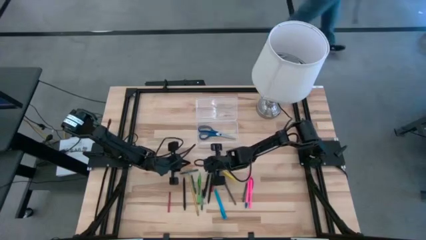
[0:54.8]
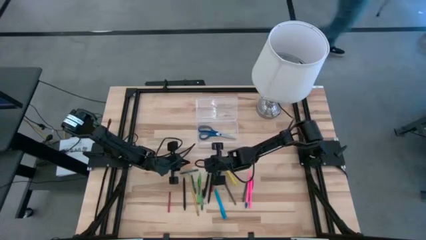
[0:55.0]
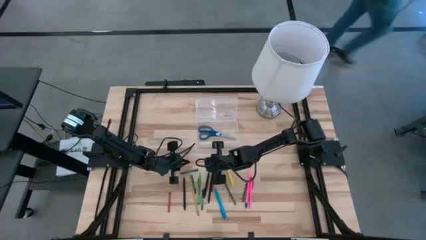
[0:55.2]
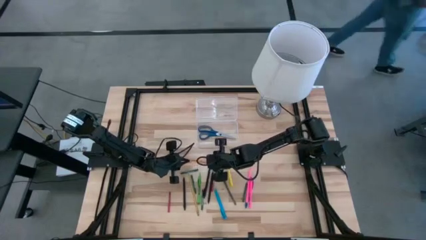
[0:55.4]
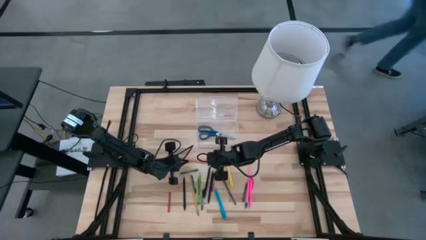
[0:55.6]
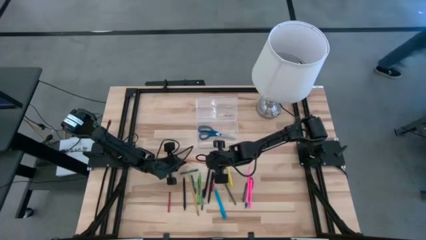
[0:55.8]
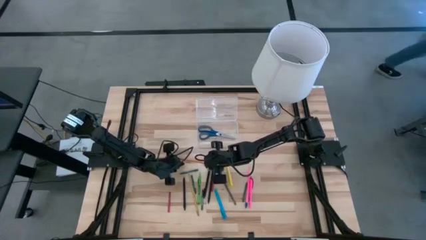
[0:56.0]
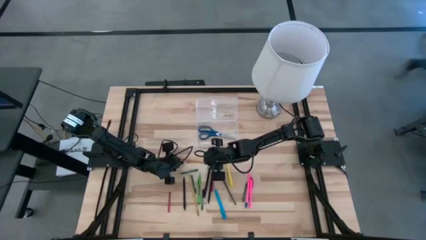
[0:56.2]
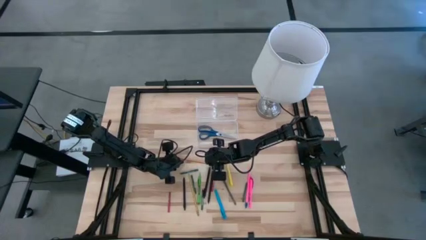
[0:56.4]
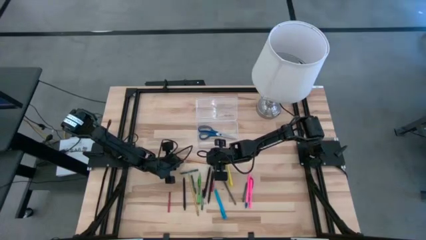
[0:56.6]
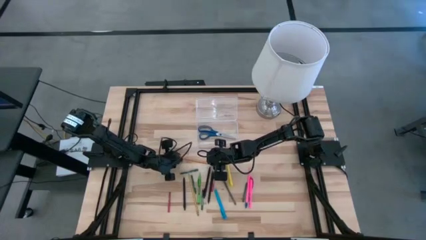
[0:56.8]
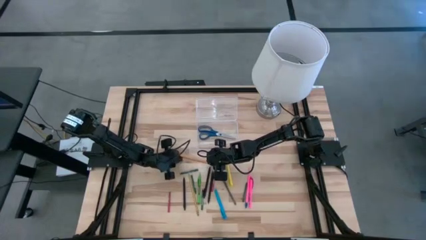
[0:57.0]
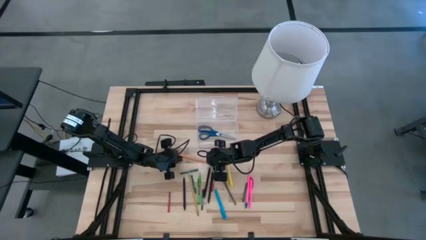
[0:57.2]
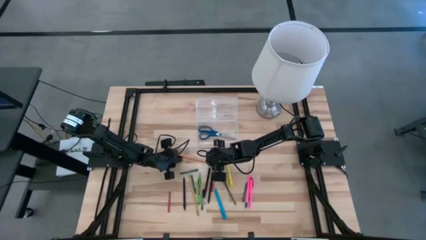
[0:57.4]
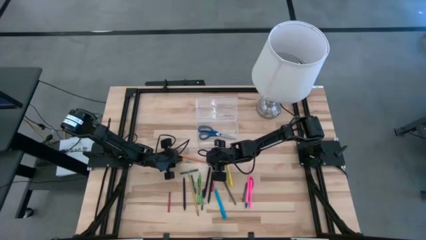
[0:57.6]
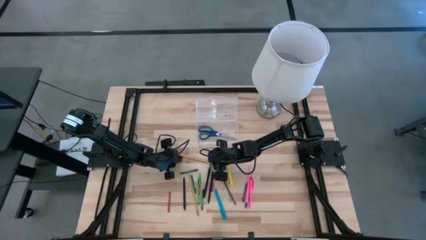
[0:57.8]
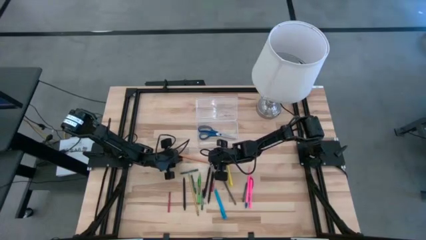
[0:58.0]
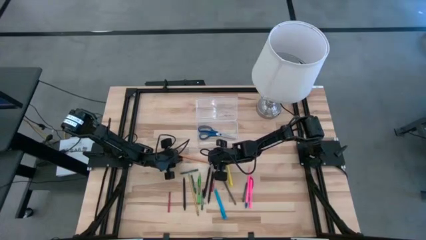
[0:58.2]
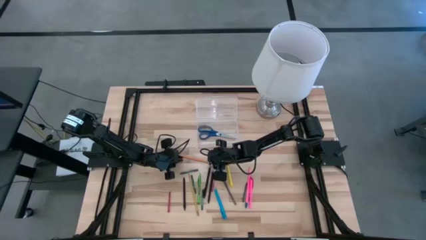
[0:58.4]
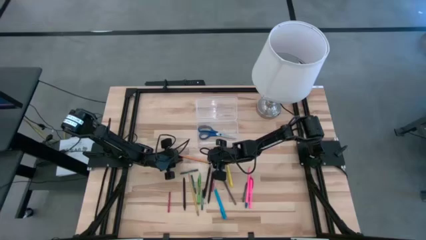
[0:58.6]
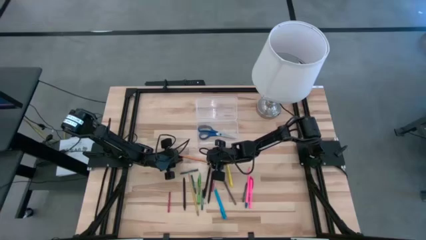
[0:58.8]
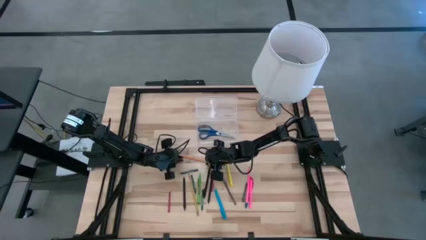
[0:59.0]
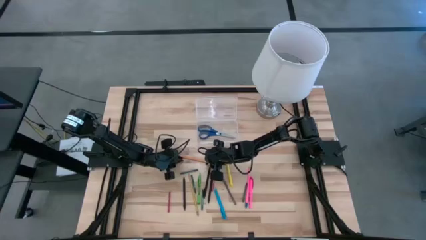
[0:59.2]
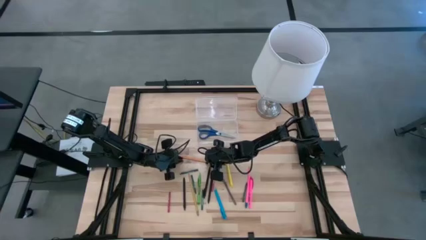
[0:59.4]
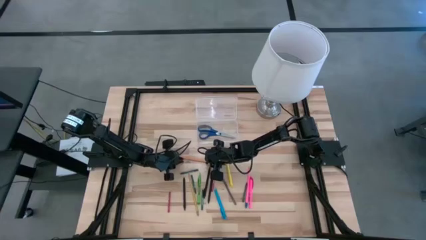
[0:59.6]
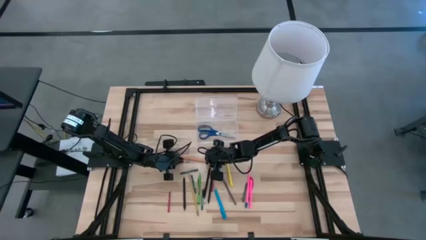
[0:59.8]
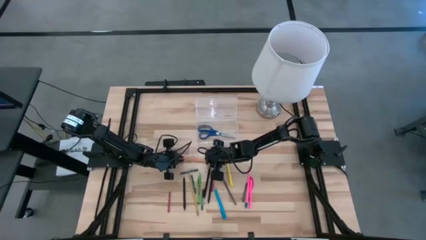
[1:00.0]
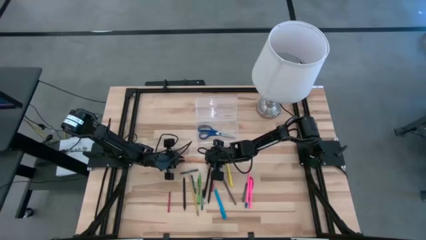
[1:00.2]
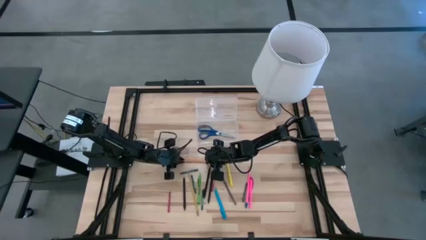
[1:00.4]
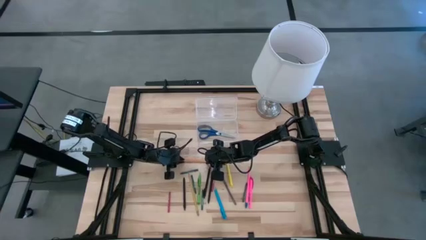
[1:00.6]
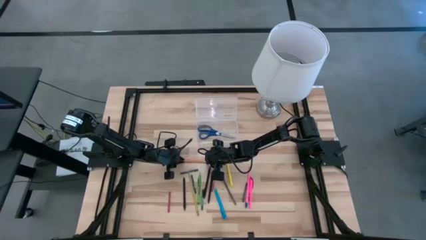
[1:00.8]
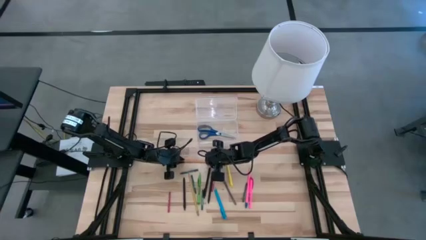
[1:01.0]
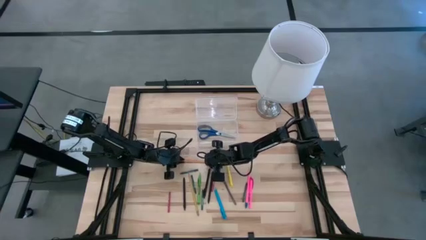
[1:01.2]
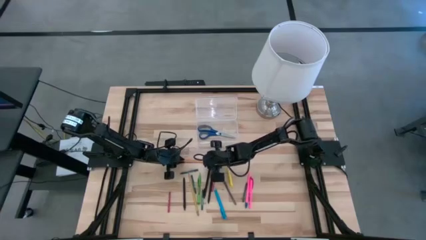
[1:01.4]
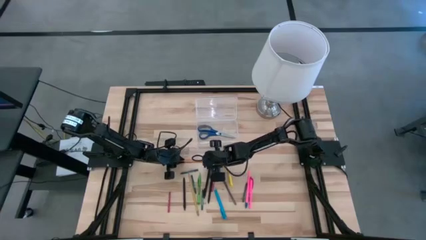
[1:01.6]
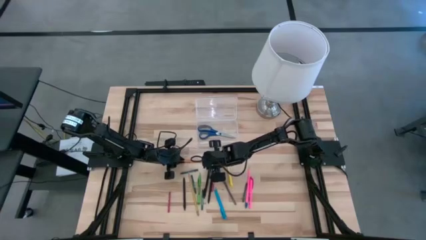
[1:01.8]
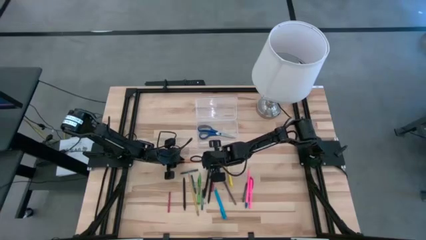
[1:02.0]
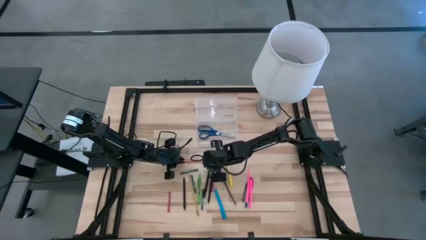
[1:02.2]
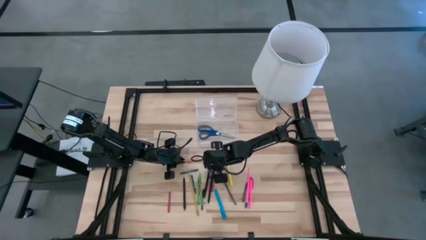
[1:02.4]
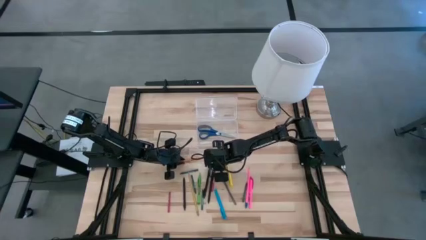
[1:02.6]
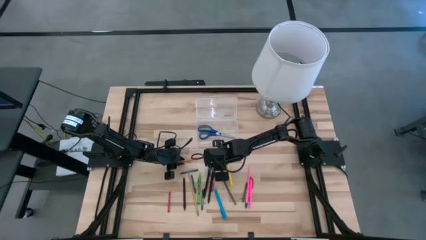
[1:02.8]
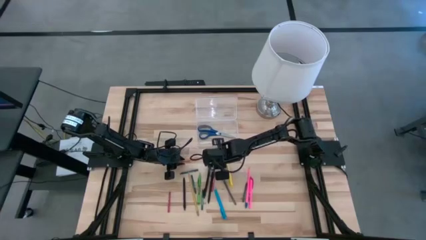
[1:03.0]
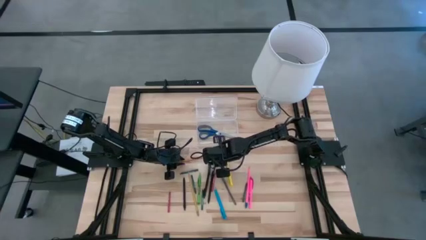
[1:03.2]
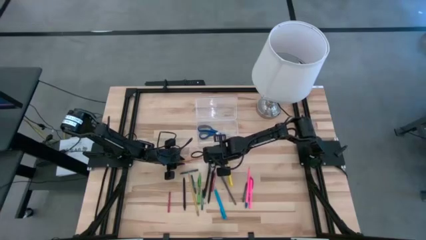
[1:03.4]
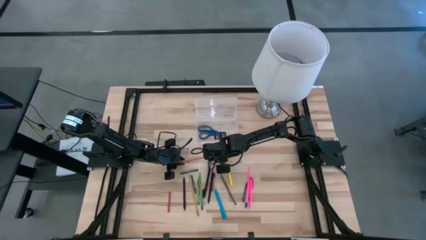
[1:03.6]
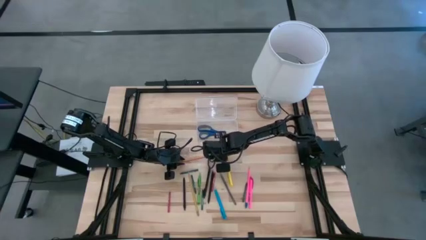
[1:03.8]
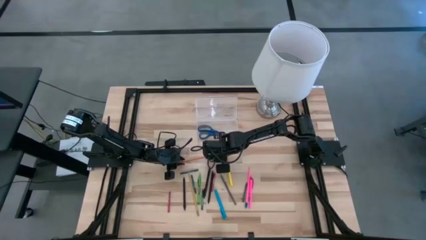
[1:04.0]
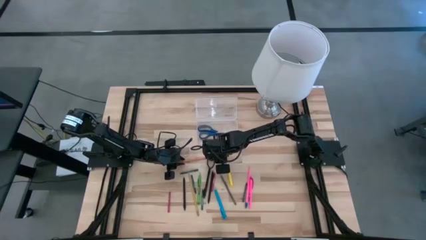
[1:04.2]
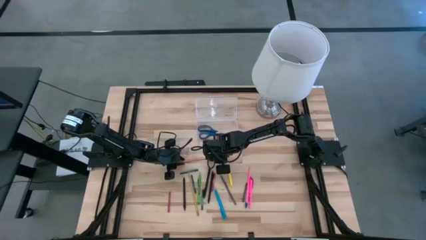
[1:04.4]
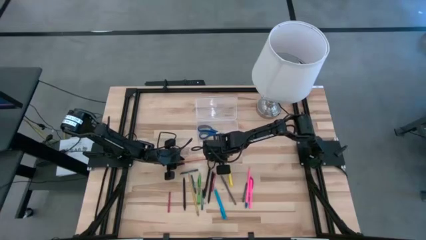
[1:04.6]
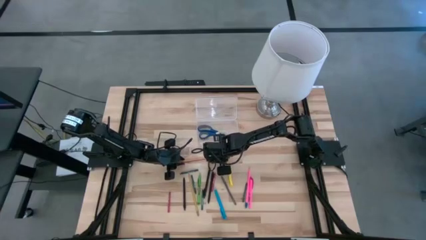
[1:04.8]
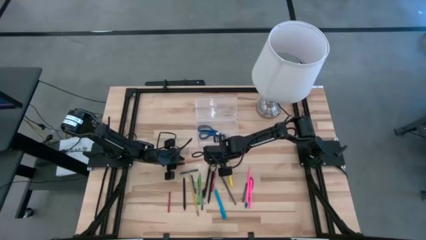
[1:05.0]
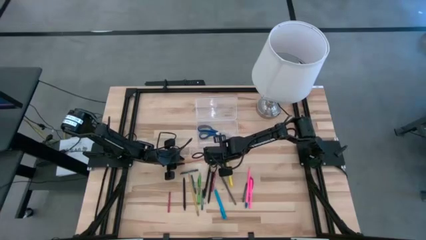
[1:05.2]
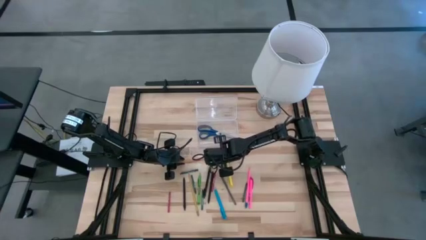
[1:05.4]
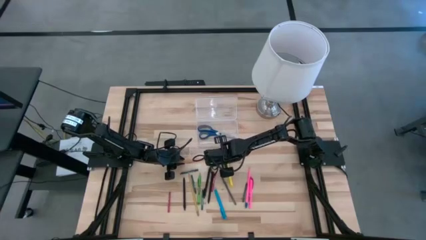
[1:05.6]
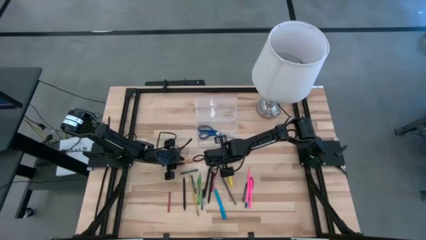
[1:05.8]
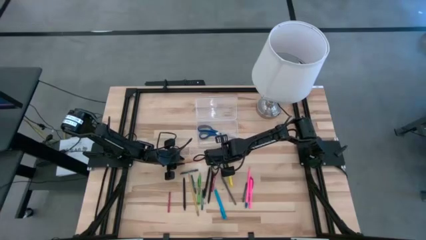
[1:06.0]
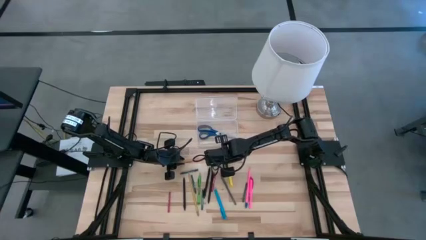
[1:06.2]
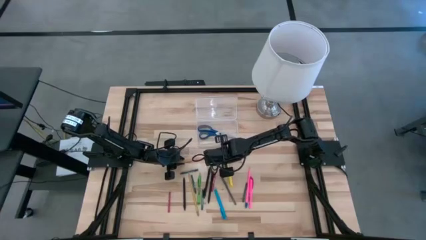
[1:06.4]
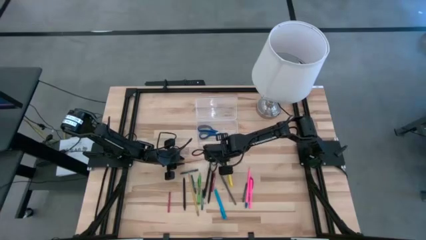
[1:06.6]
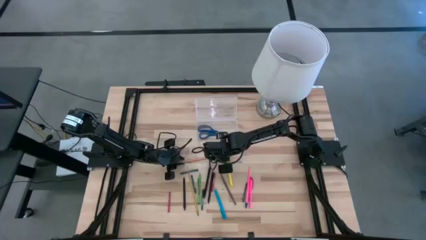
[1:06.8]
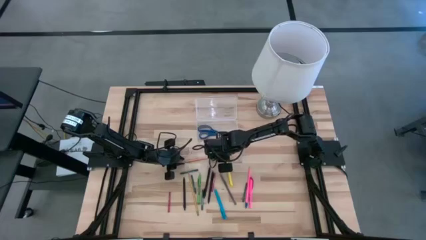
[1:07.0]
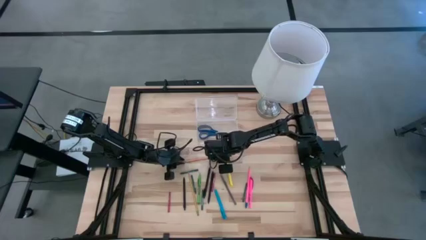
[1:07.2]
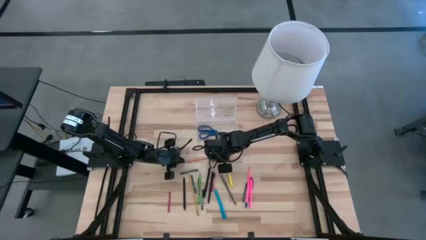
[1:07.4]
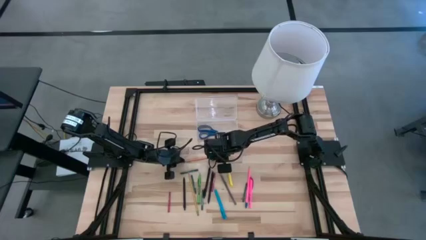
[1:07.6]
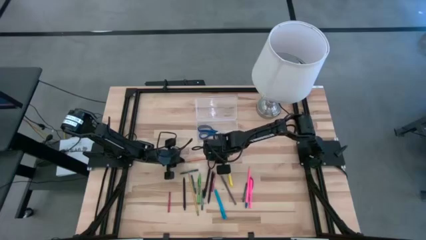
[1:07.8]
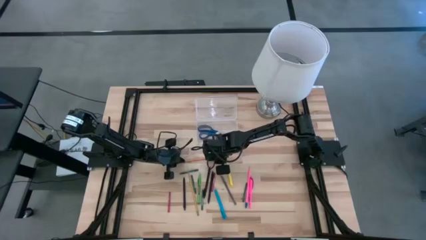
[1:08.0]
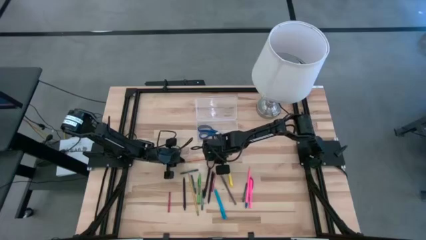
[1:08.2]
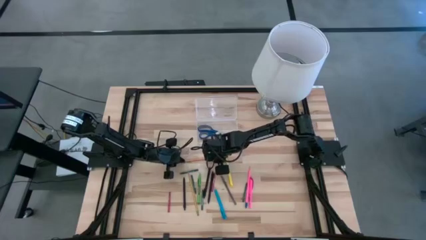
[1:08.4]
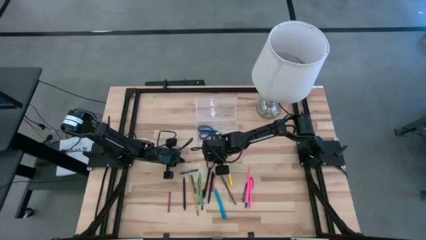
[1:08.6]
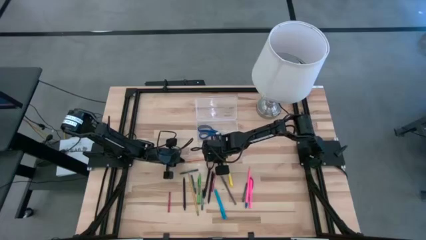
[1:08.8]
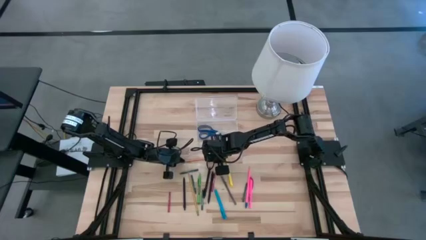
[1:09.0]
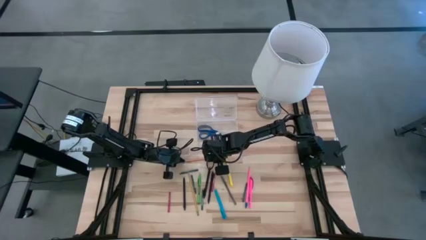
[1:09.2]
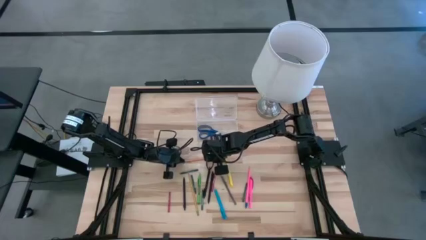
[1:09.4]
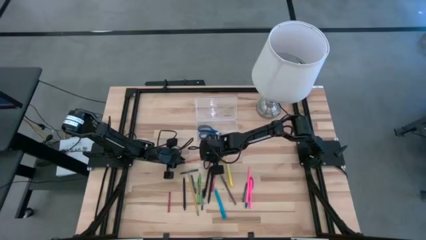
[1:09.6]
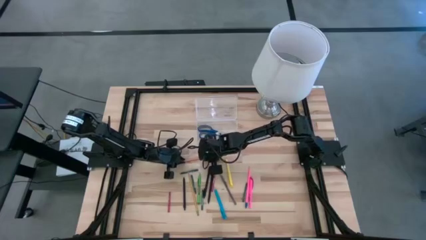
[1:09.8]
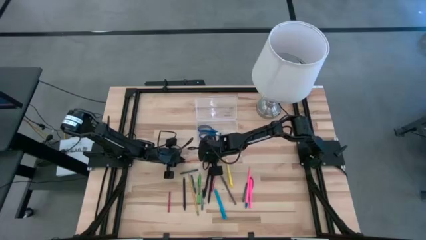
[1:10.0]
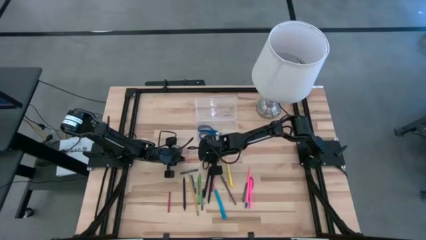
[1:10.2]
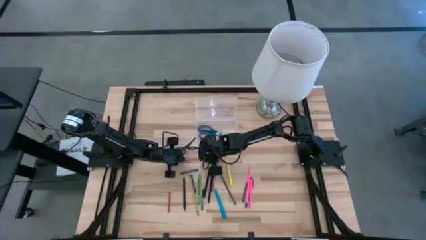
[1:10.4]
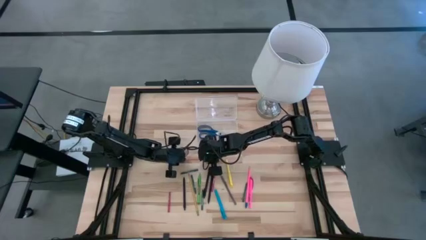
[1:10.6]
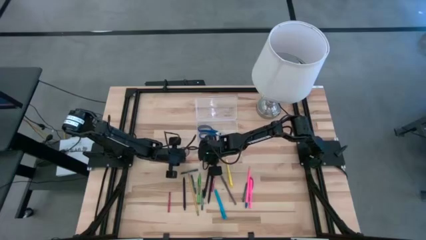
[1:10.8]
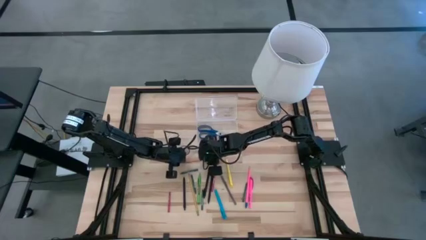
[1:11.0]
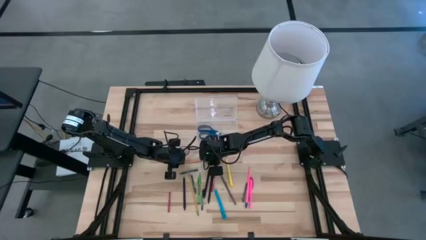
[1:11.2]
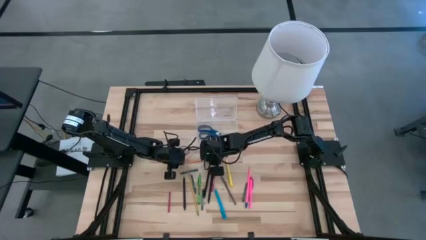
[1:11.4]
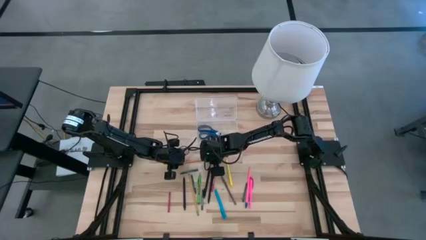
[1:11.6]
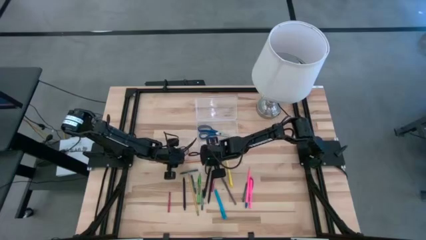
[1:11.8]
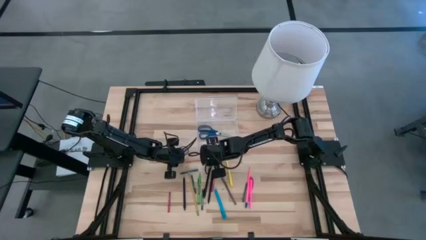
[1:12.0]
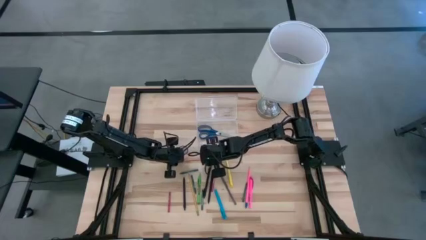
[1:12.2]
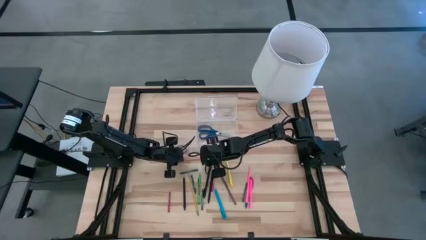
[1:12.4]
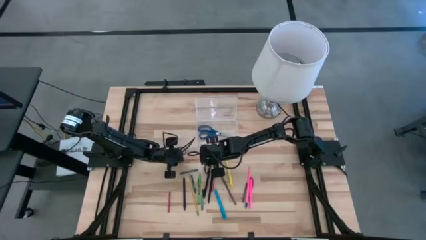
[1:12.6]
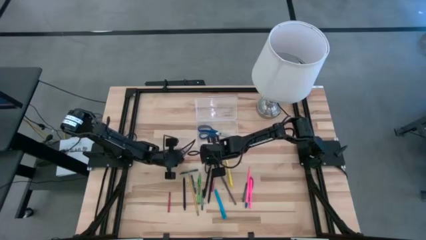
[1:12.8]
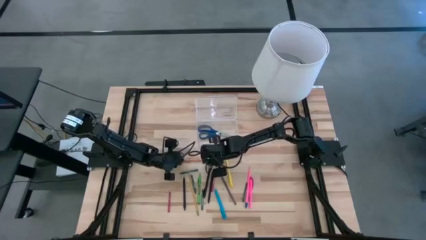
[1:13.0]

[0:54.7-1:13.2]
Task: Pick & place school supplies into a supply box
Put the orange pencil into the supply box
